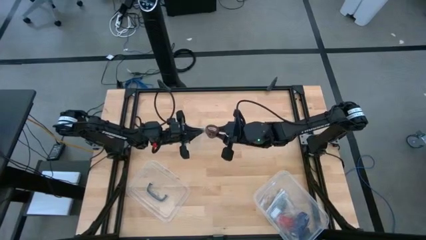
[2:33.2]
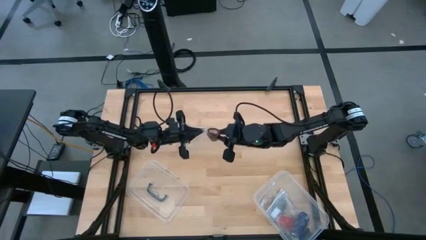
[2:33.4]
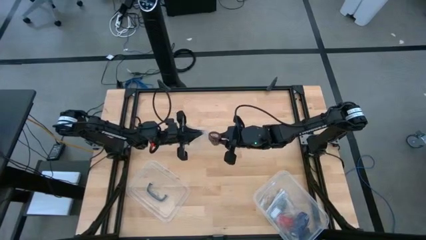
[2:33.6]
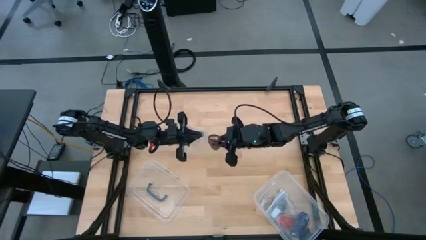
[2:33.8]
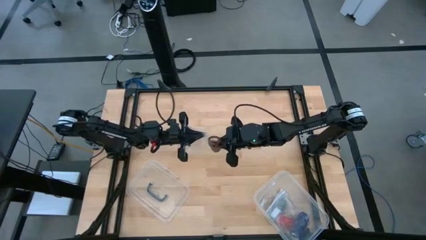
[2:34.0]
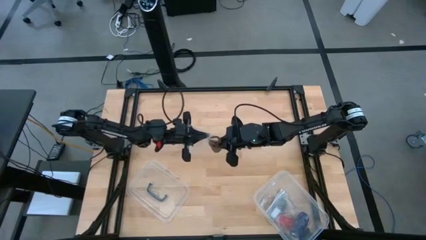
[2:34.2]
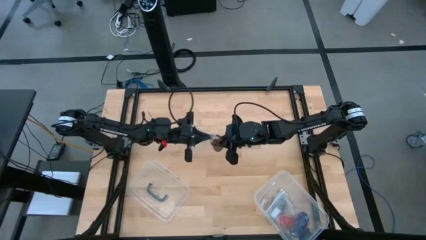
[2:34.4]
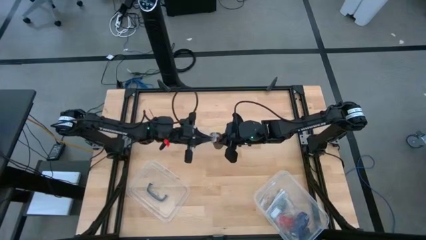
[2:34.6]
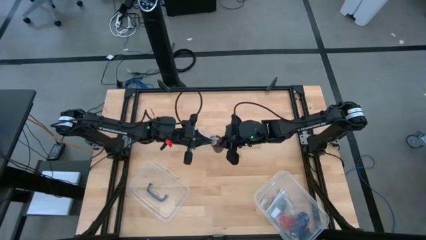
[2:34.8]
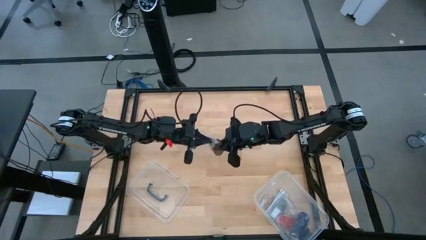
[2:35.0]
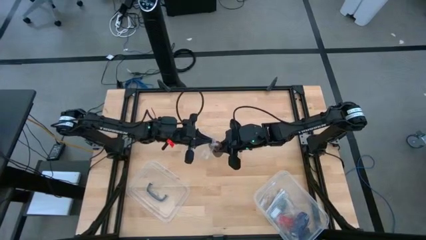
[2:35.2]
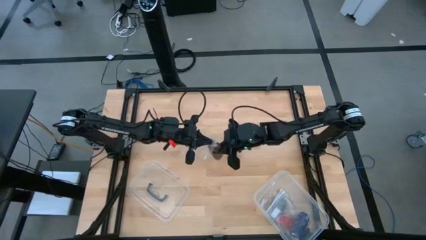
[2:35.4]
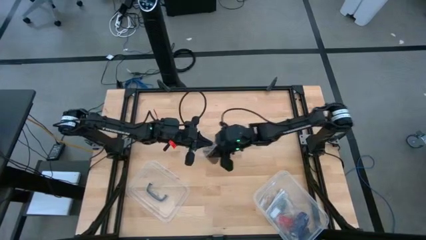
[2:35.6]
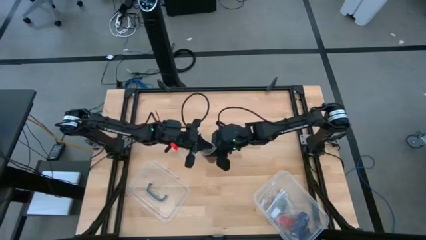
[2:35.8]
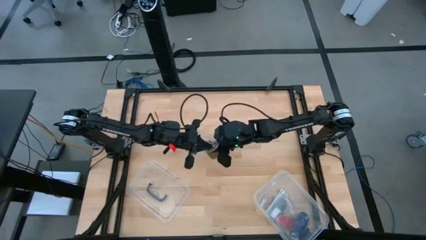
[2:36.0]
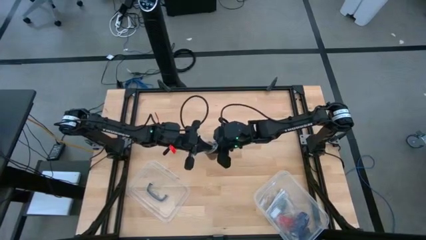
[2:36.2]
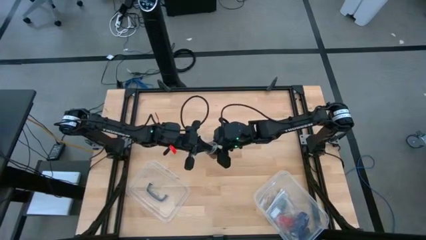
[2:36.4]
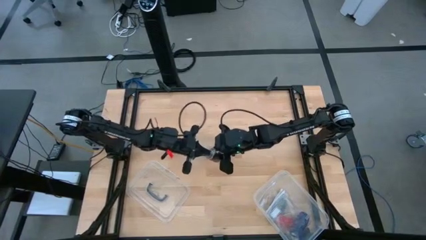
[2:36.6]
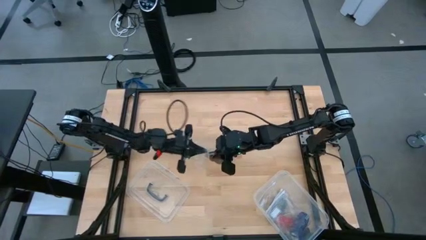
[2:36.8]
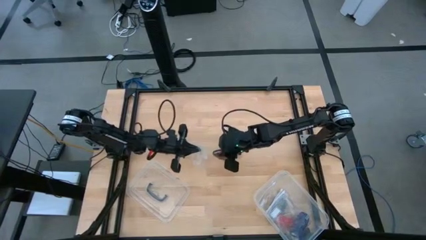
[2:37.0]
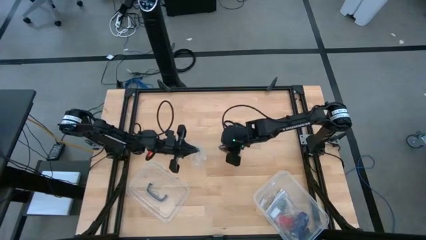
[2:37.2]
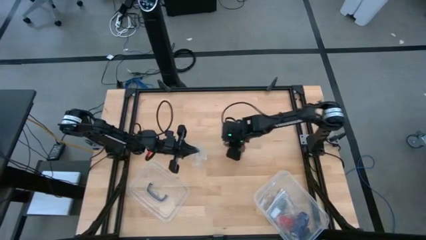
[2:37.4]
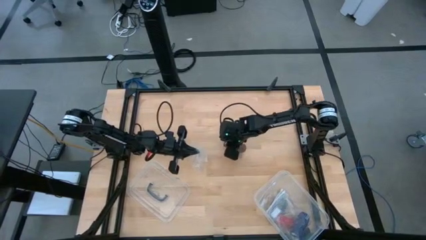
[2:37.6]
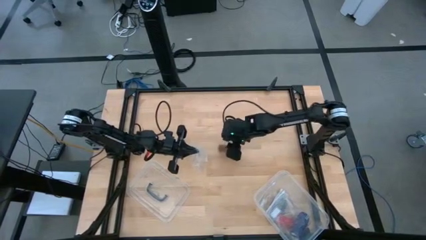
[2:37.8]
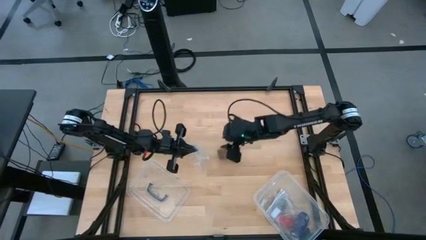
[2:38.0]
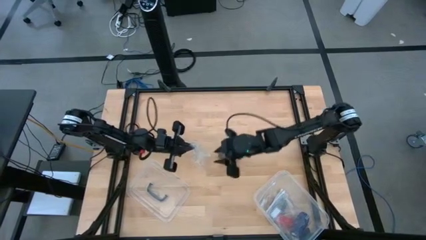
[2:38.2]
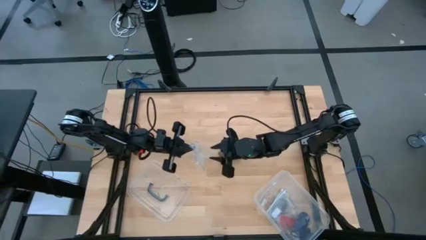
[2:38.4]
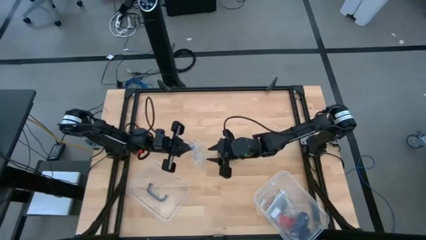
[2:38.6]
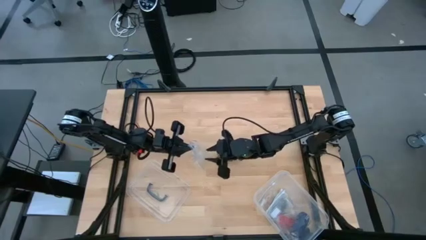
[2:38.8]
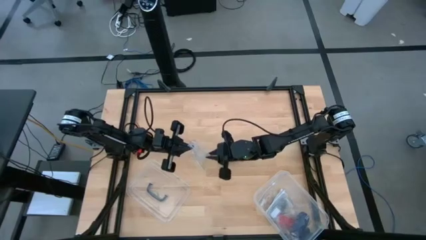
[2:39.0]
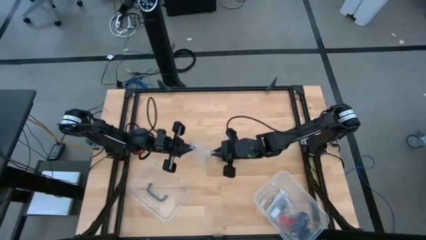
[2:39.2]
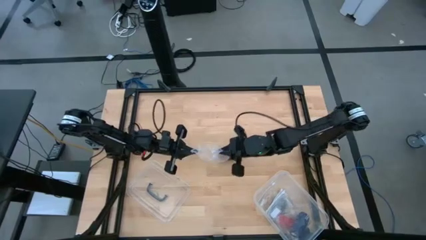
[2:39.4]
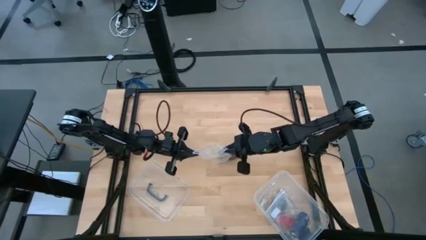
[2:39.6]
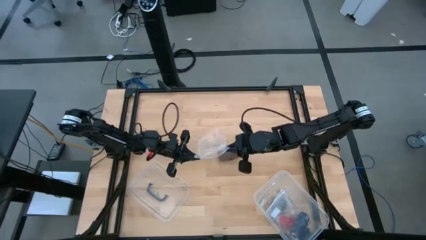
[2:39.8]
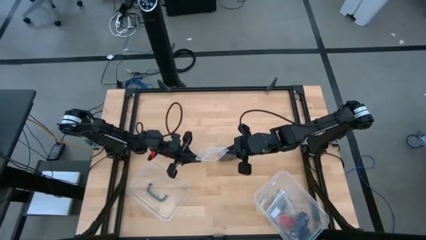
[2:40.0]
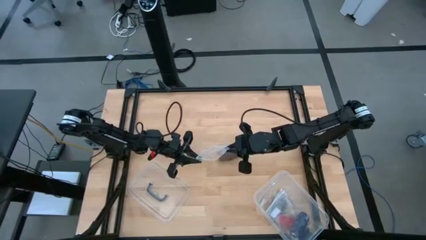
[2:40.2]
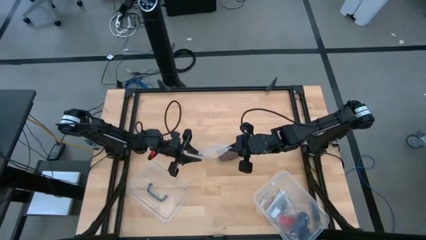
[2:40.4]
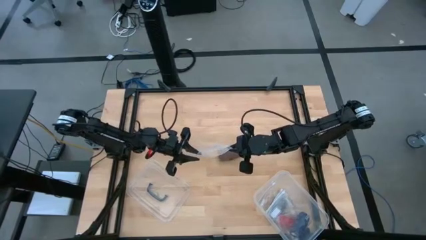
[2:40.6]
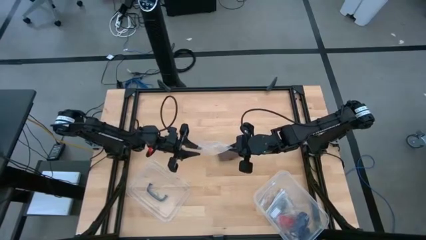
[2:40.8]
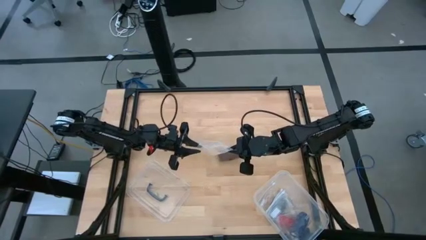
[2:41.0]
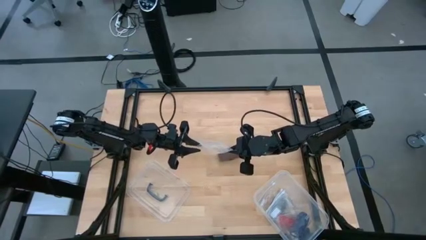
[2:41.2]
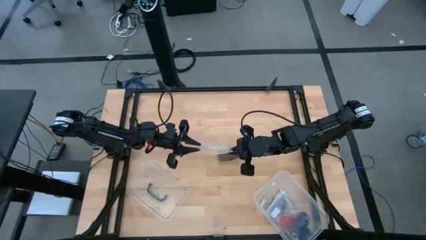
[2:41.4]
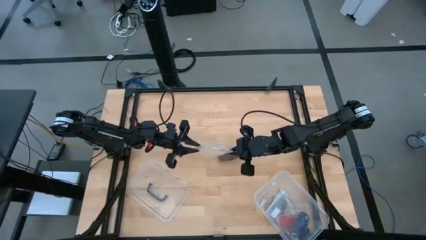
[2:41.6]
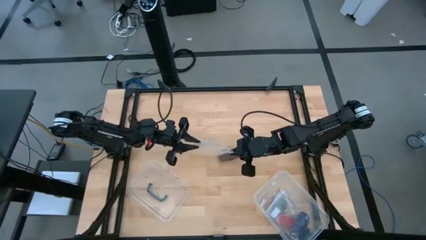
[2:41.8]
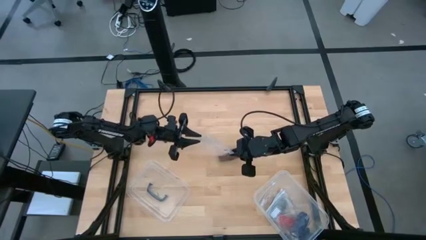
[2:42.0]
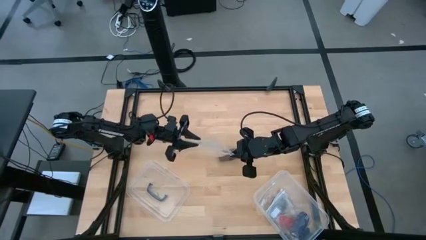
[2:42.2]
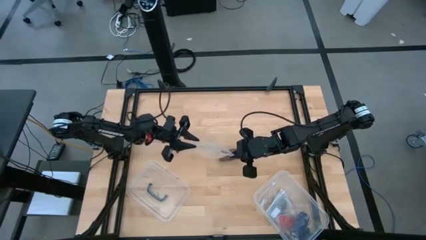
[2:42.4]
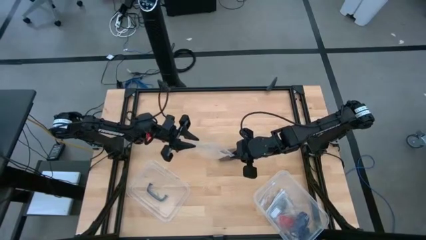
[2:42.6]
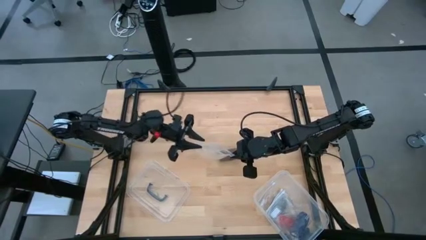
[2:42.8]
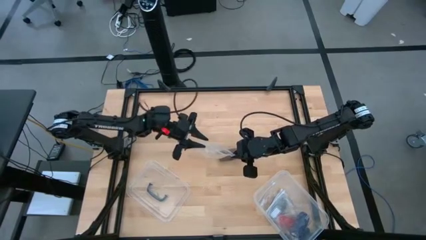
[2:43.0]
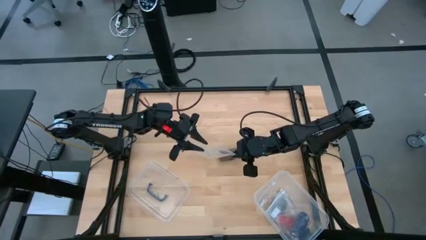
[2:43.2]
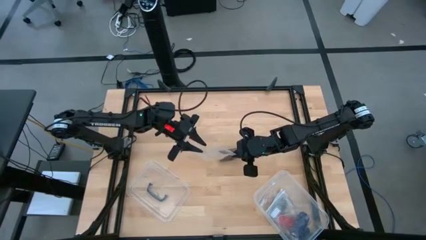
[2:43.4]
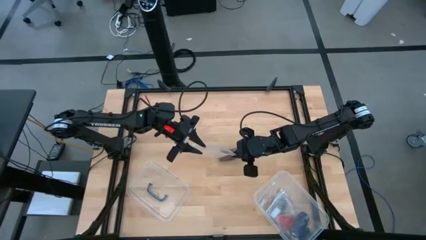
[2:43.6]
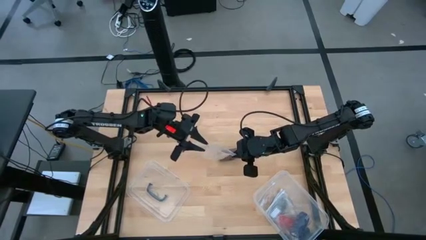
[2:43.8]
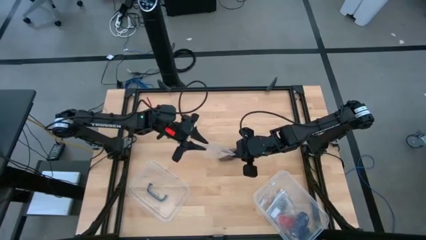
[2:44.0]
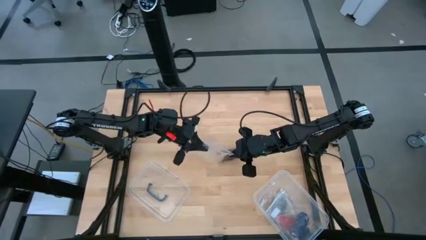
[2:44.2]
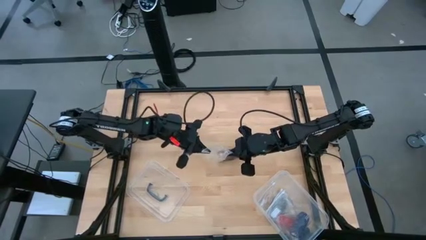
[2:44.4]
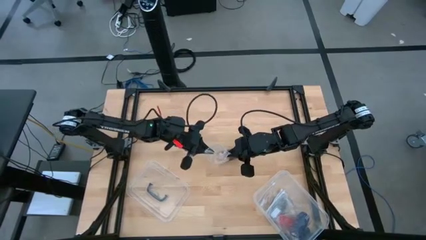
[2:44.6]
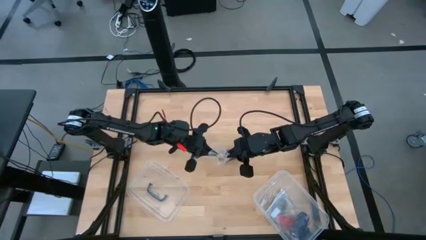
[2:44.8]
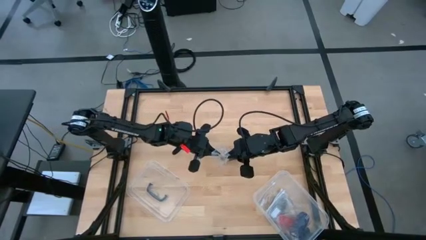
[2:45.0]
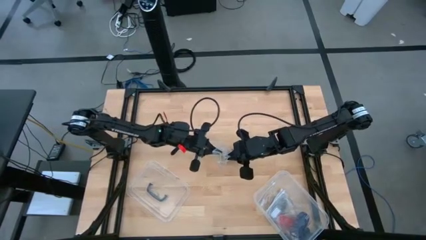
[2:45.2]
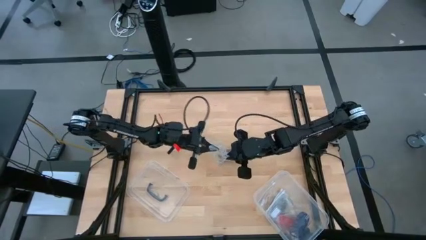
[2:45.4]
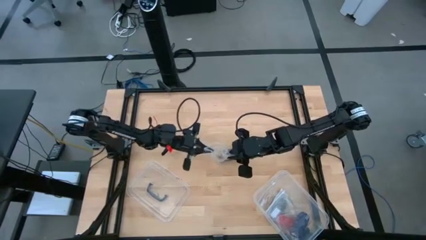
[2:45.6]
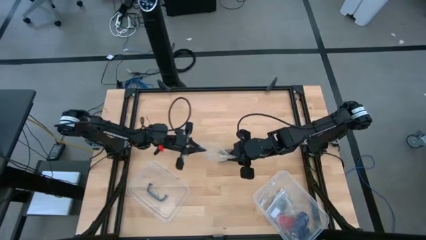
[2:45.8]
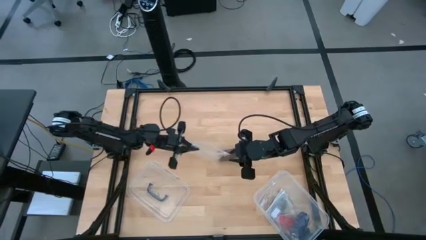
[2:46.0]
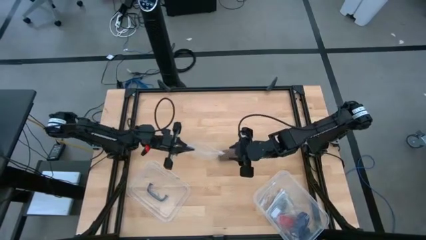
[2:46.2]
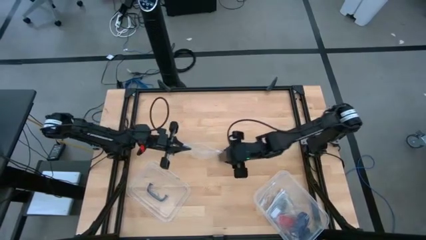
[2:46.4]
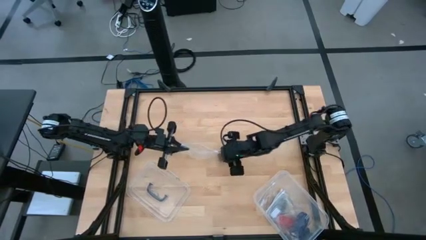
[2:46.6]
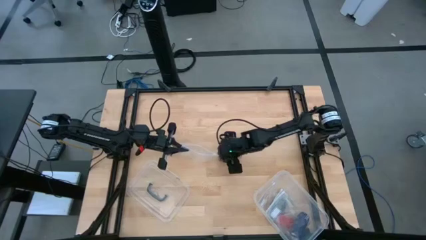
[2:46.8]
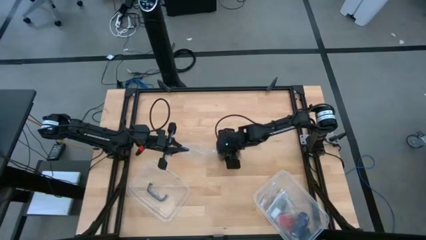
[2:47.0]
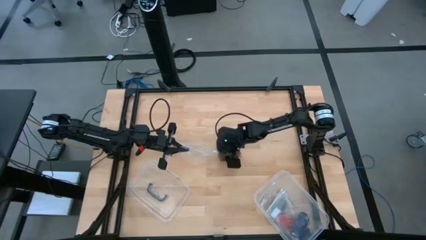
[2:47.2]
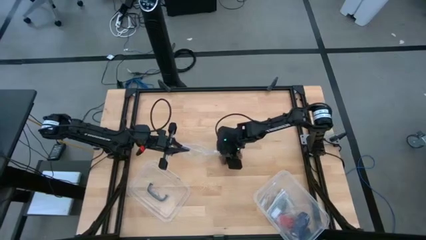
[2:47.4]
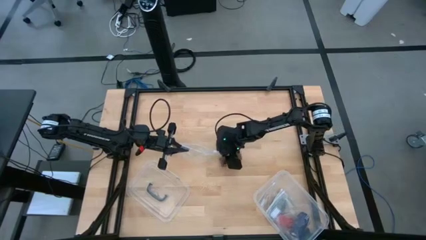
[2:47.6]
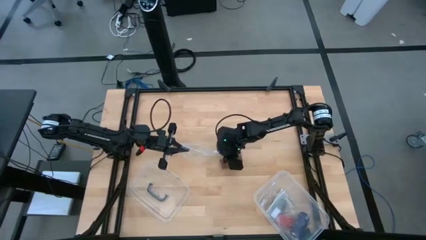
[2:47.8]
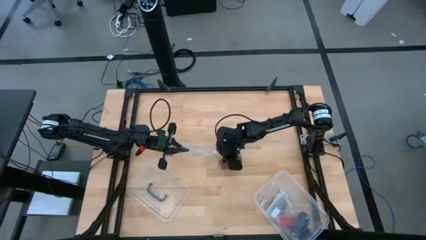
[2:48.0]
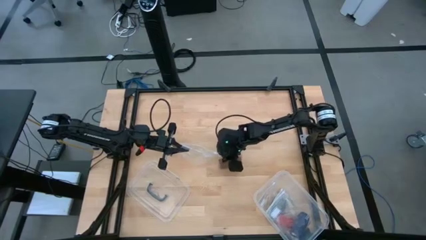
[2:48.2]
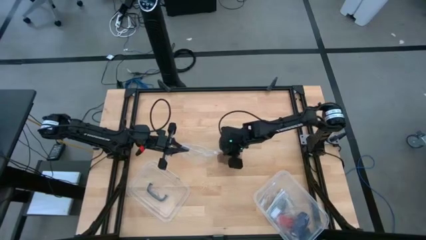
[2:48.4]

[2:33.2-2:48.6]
Task: Roll bandage
Put the rolled brown bandage into the transparent zip bag

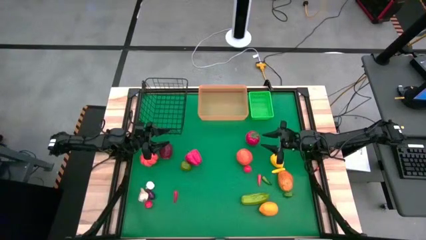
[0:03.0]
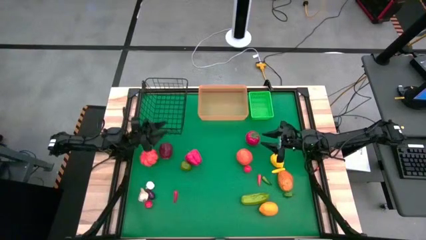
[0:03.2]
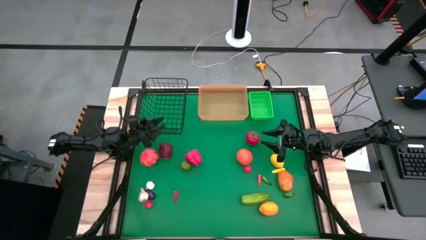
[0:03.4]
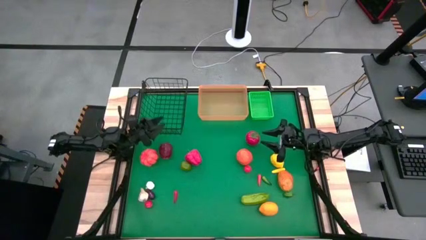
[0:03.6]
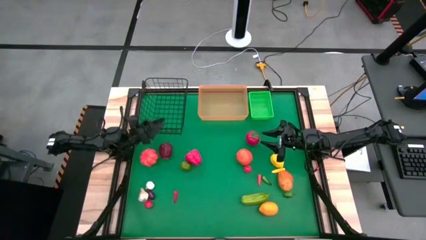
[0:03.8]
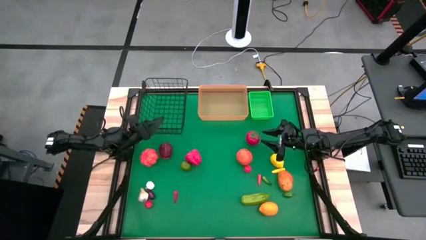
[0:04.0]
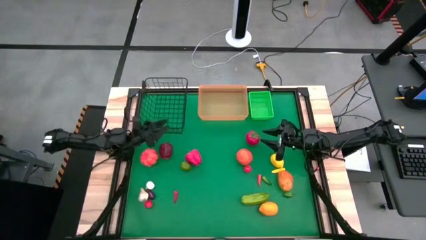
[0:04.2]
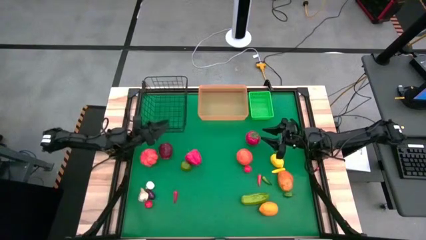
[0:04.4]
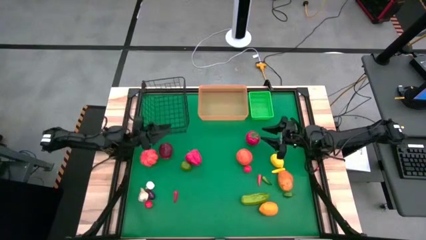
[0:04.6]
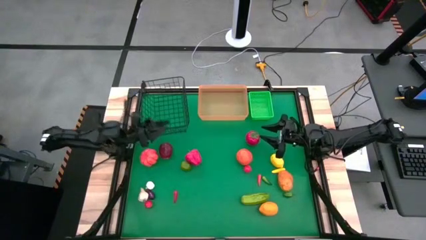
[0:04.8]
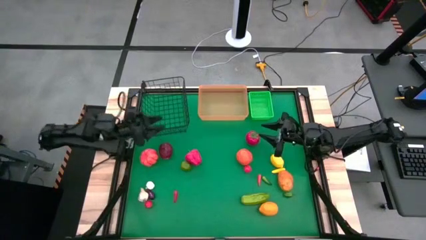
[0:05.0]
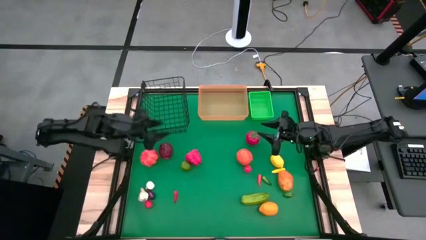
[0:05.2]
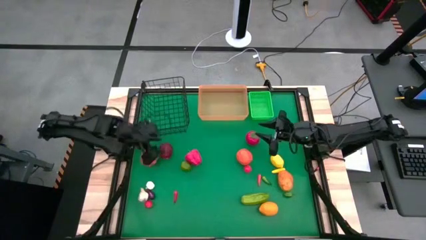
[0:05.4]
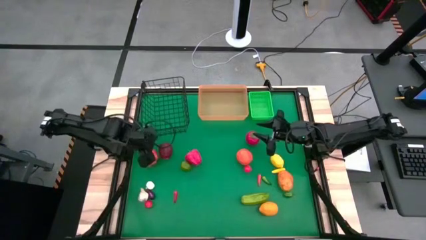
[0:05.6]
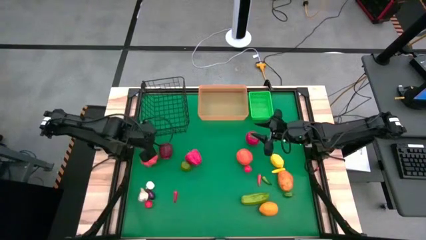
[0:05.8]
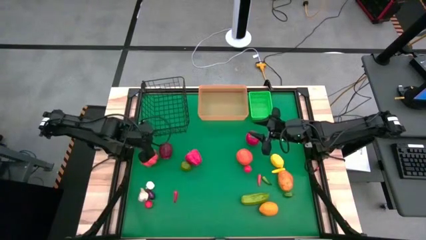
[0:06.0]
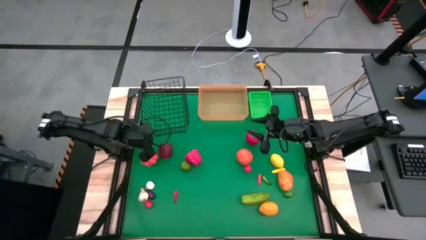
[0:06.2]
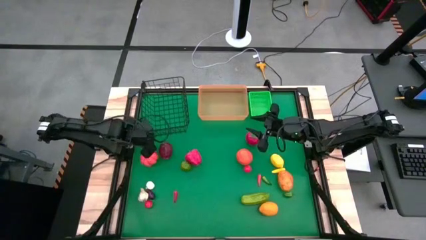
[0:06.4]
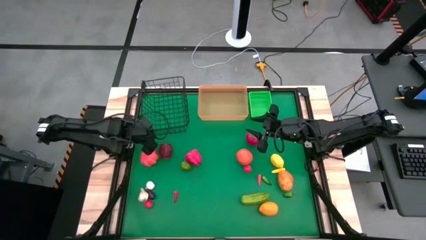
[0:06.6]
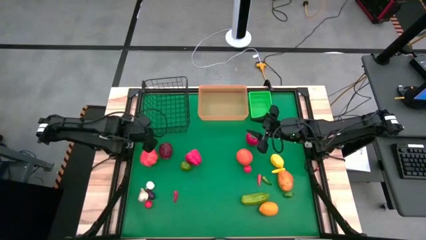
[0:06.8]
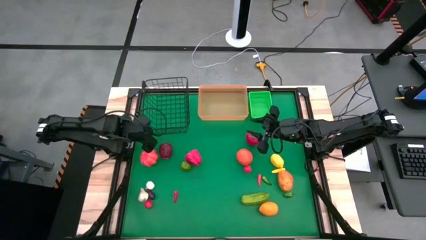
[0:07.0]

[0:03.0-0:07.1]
Task: Sort produce into baskets
Adjust the wire basket on the table
